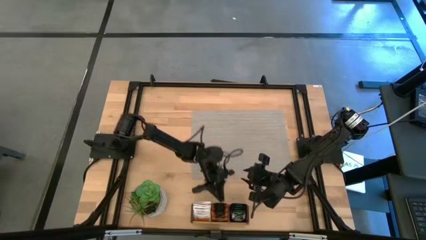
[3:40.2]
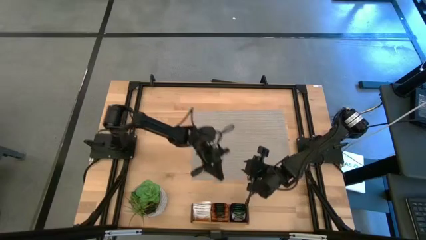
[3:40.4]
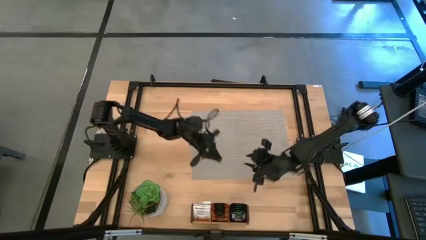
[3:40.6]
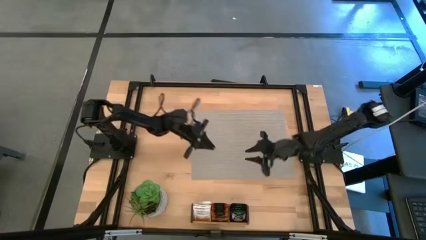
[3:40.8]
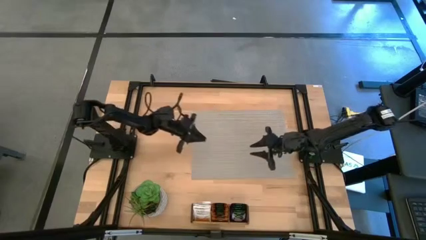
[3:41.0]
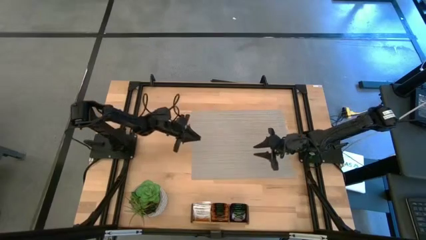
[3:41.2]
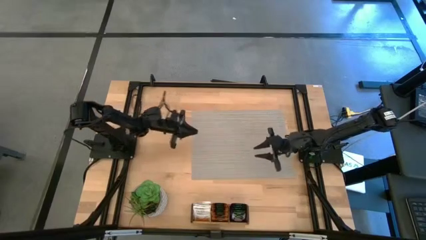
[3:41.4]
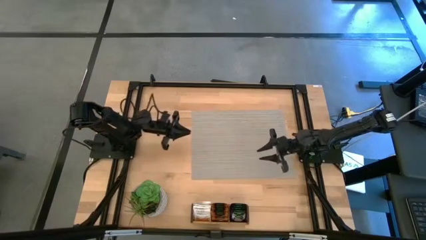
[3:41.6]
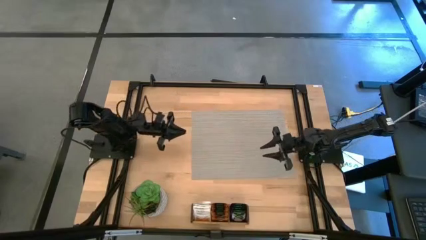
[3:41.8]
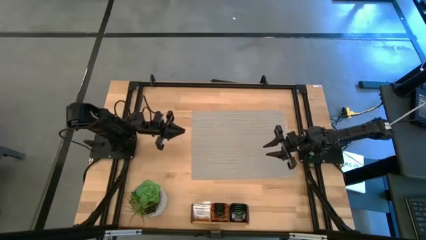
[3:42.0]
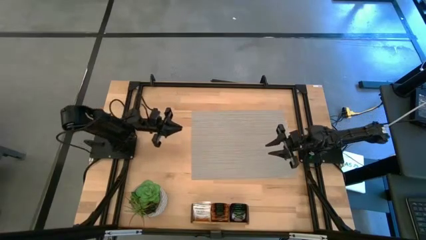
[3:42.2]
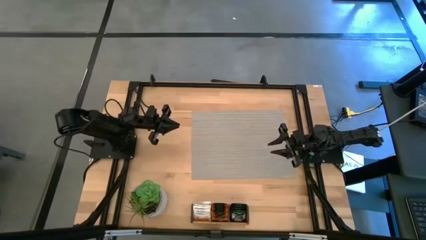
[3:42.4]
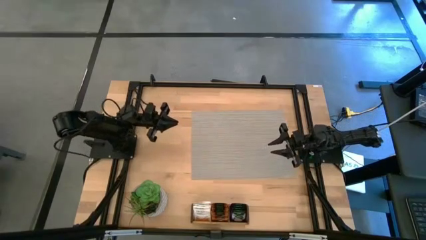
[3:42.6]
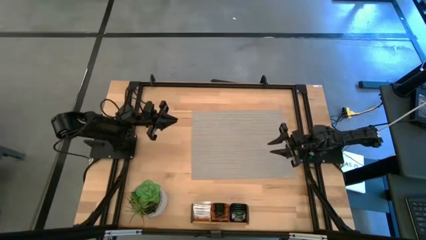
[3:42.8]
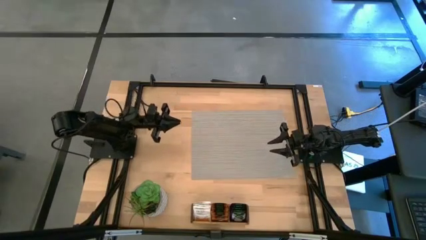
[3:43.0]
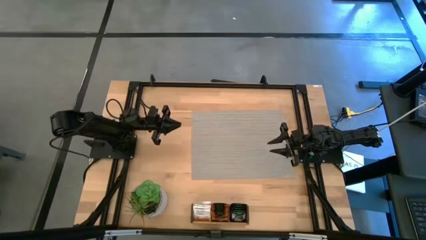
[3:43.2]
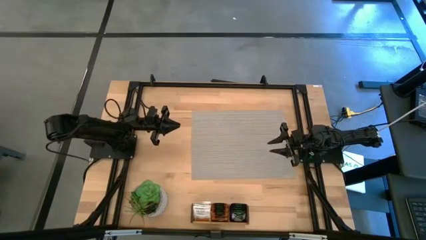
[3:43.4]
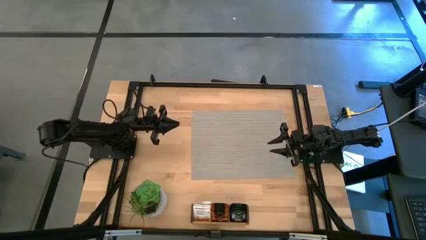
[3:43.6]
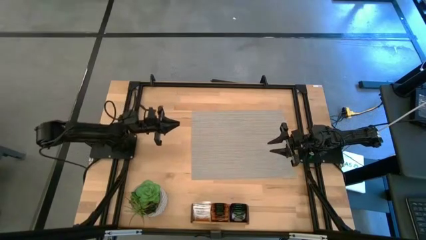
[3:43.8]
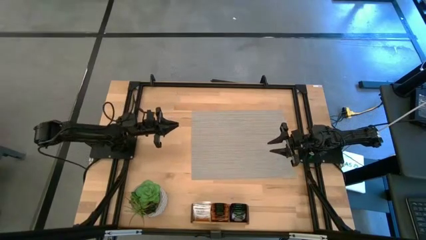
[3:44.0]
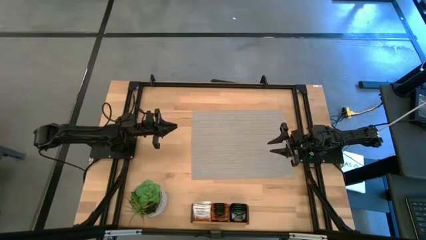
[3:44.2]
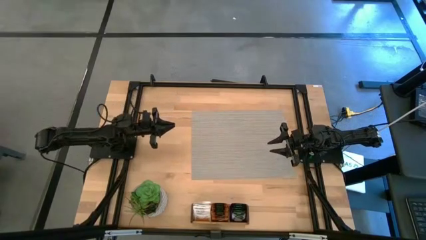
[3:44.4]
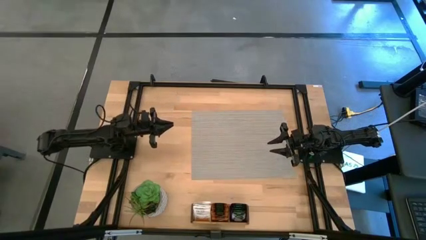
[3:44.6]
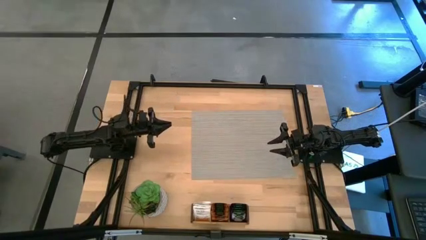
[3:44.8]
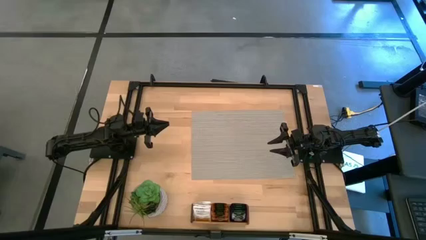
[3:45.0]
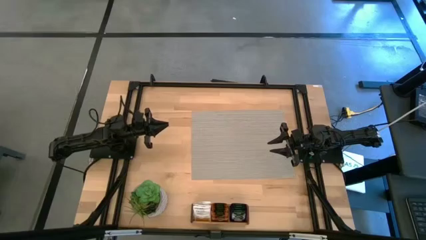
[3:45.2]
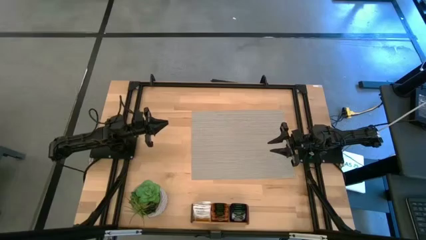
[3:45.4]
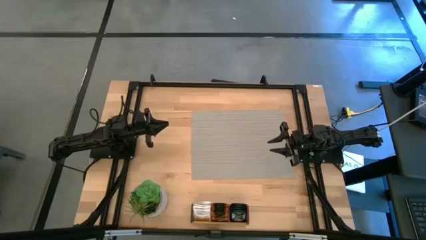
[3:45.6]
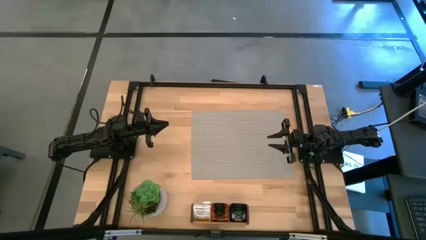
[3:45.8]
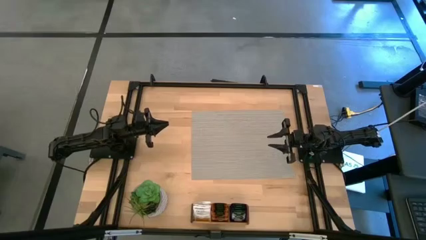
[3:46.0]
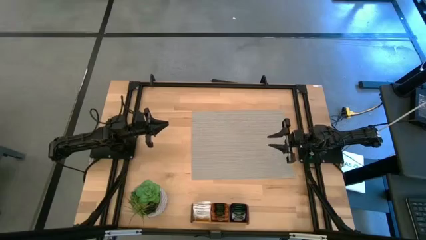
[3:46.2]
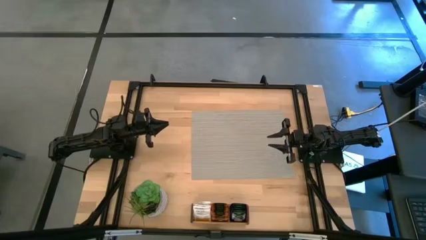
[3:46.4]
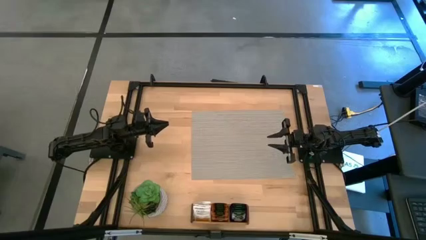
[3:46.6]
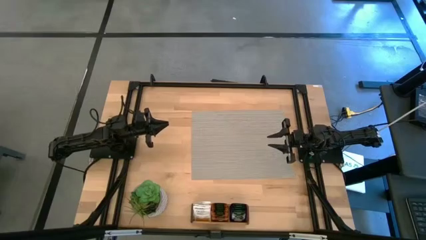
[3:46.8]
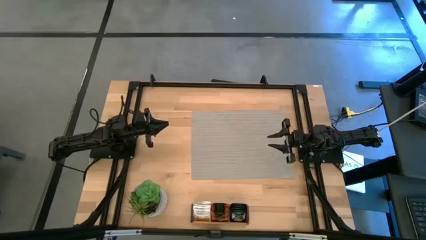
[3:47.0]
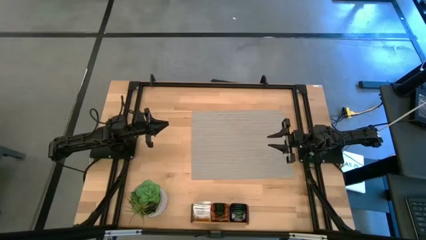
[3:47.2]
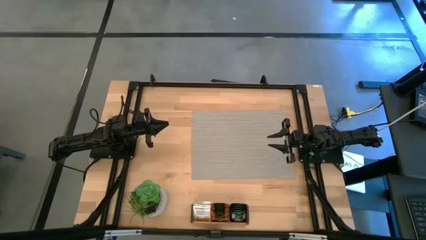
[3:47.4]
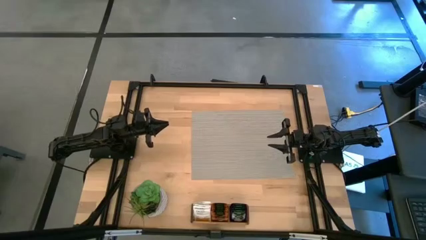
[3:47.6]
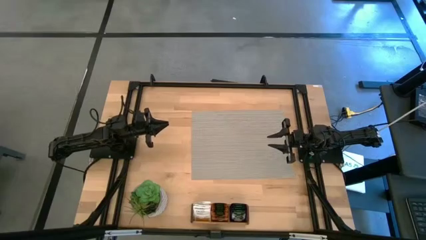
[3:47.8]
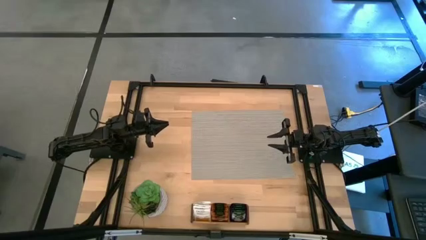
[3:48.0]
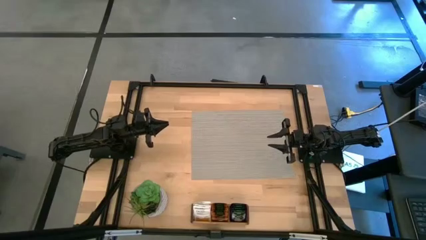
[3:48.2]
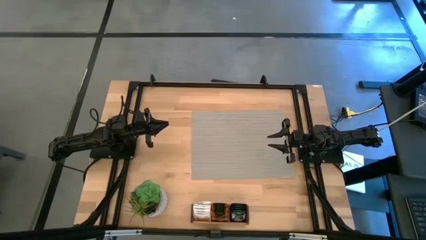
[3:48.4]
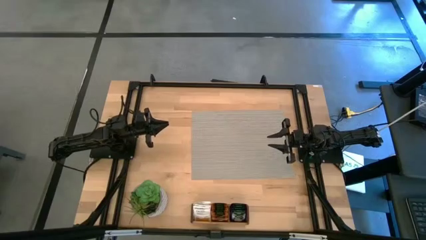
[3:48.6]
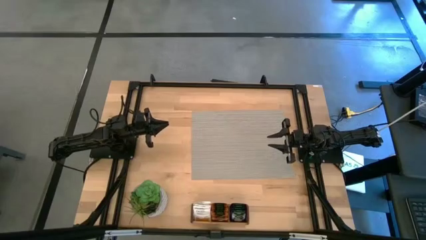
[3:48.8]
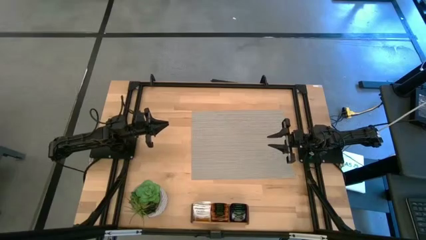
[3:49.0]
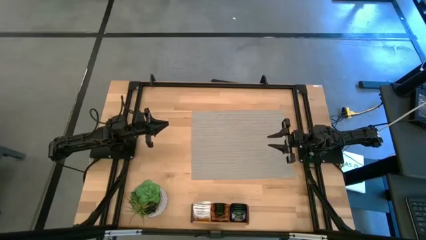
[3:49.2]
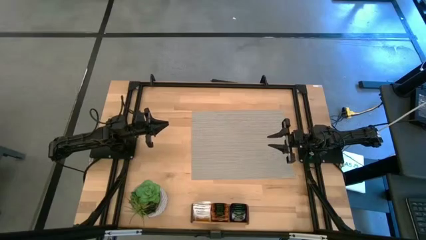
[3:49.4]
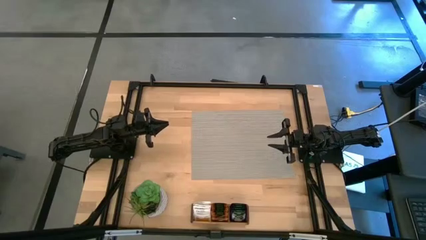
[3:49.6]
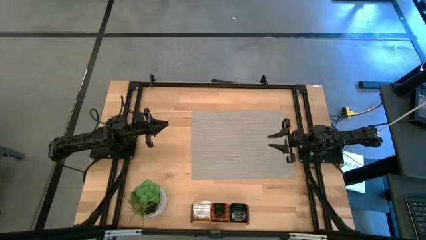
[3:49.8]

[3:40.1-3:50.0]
Task: Pick & Place Tea
Return to Home position

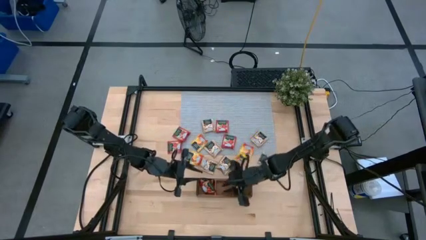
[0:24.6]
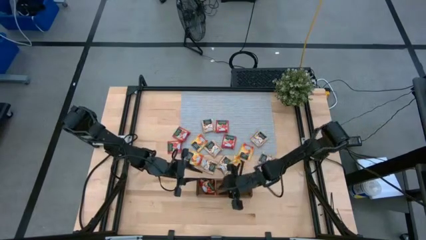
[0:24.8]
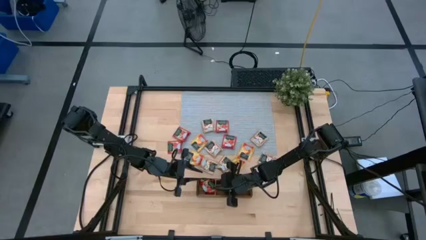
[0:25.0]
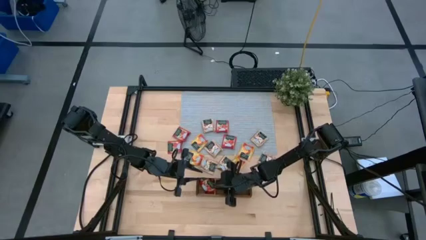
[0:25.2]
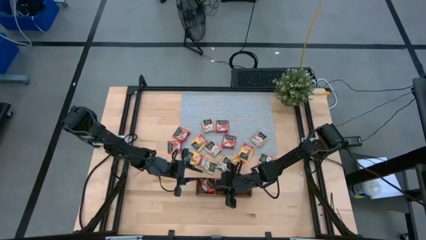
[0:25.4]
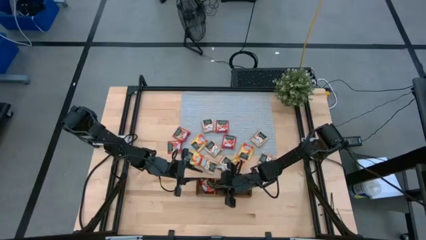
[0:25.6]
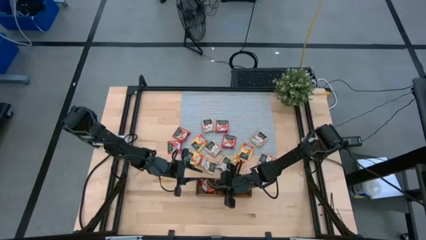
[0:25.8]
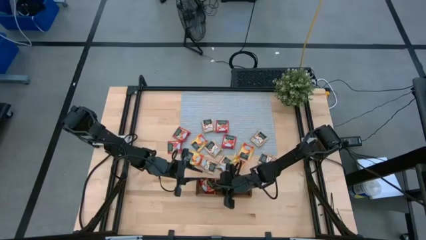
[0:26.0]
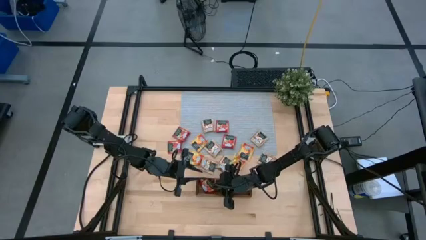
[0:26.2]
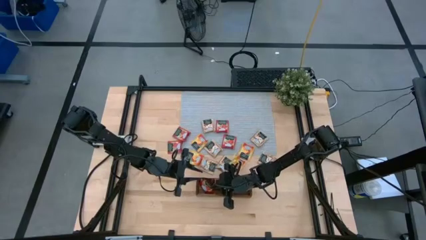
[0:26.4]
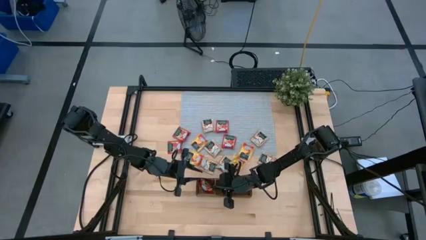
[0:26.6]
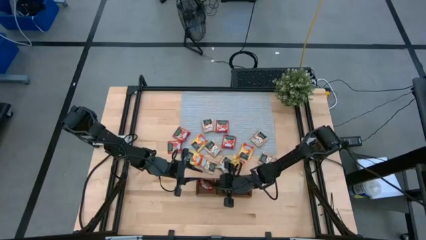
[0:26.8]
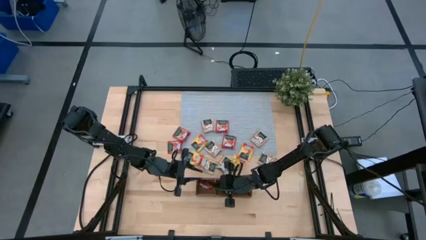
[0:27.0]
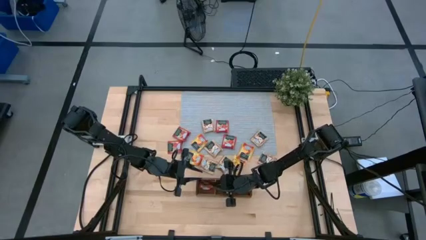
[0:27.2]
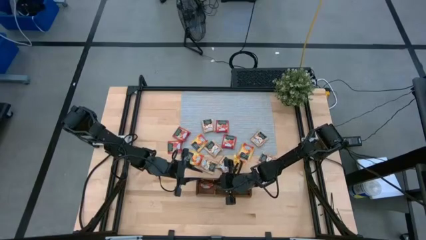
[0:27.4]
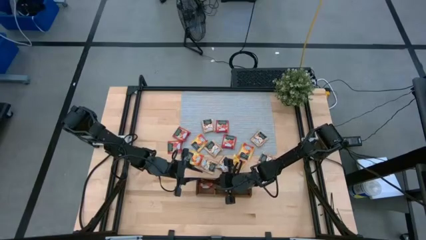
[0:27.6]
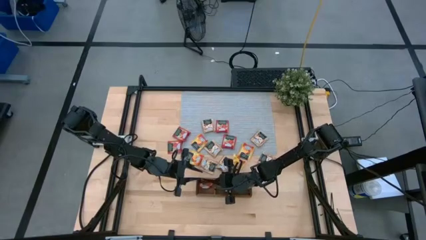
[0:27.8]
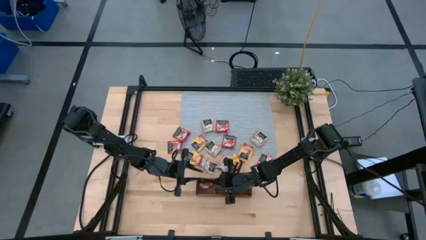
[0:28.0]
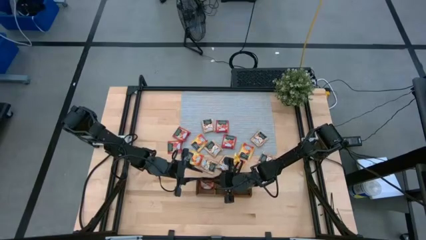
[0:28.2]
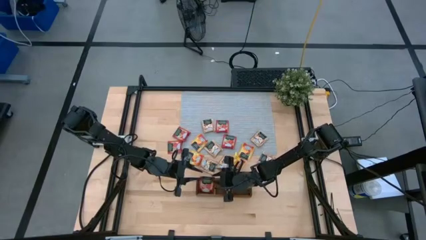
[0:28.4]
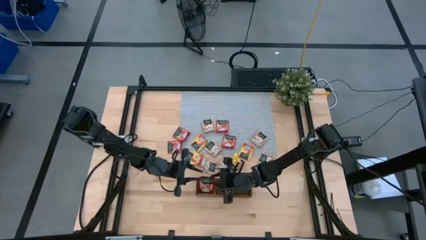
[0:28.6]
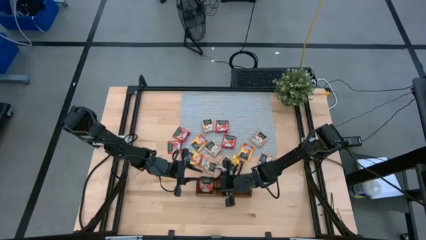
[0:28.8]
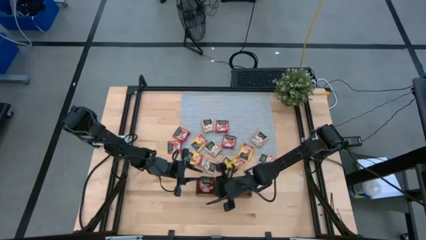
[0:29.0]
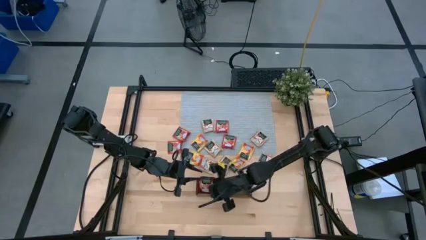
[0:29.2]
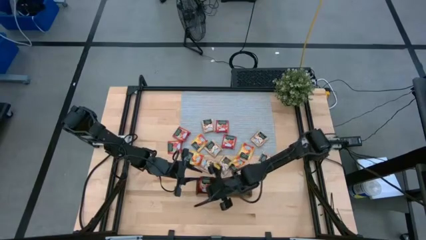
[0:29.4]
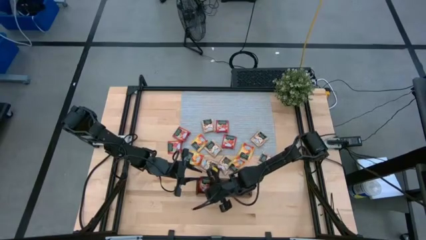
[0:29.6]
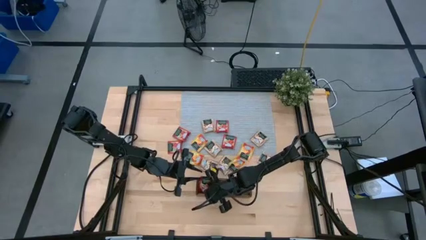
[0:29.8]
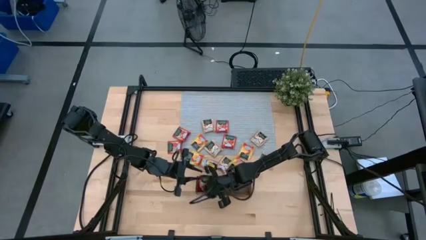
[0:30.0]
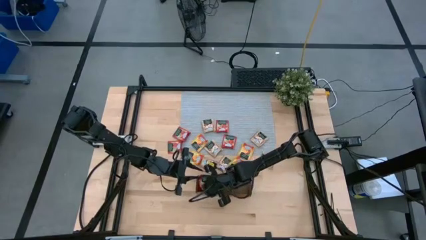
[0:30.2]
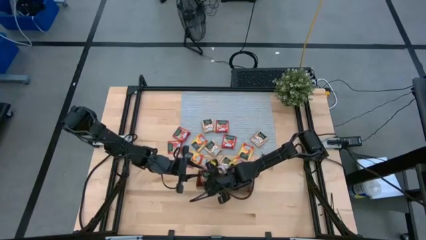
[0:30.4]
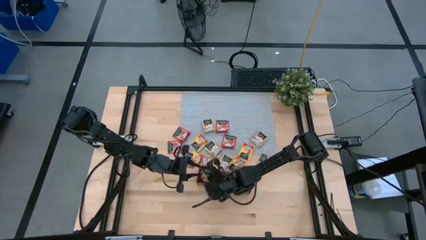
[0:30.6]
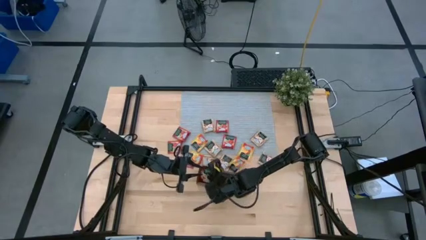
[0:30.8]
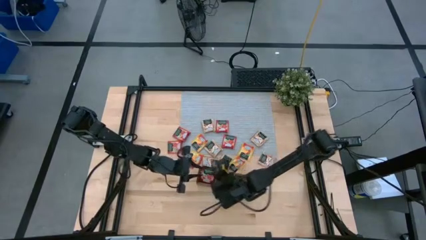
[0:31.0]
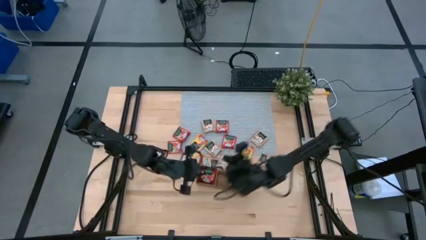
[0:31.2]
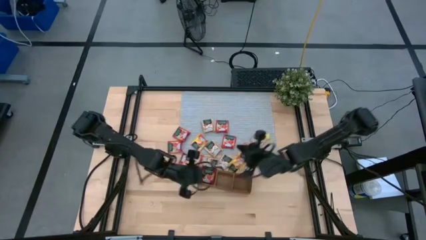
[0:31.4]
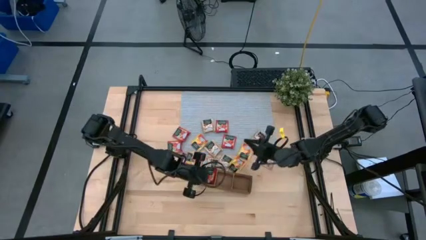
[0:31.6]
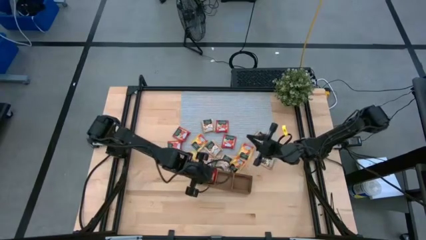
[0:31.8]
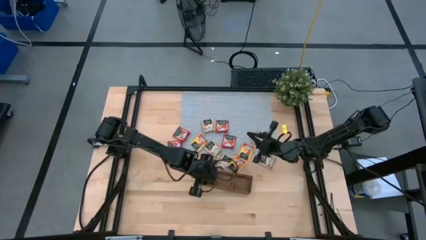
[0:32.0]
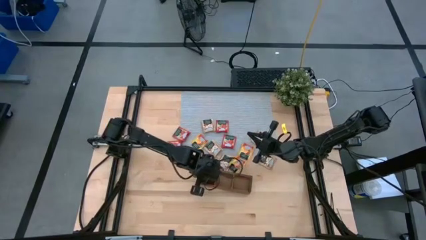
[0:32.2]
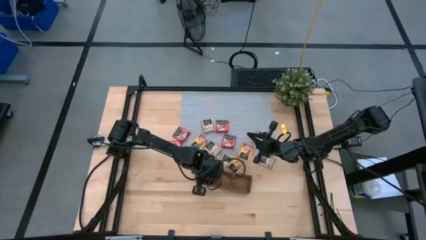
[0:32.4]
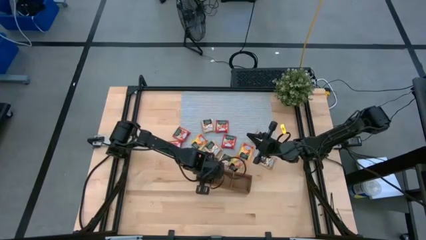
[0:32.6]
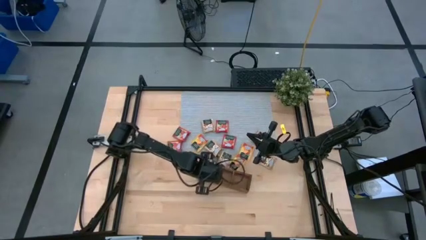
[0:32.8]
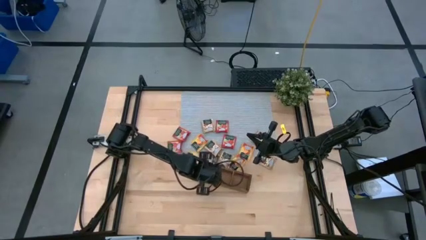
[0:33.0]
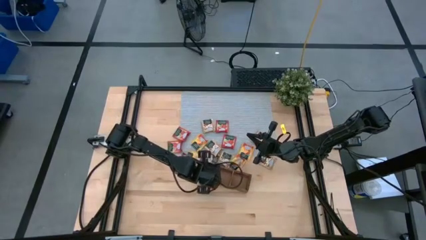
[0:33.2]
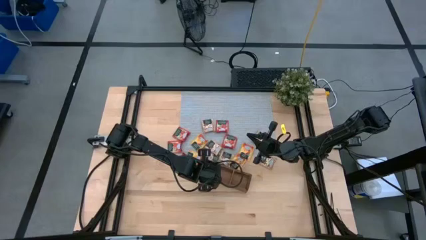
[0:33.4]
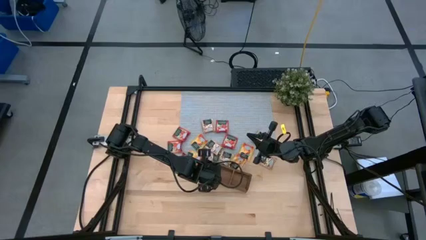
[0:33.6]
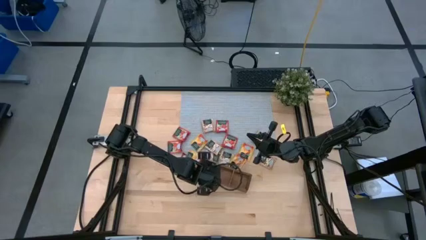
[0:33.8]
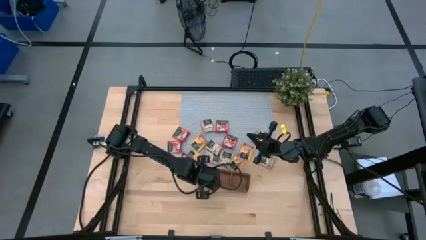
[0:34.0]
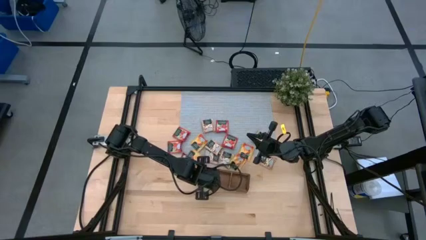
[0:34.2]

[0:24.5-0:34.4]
Task: Pick & Place Tea
Put the red tea bag into the left section of the wooden organizer
